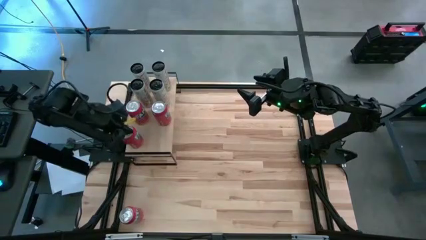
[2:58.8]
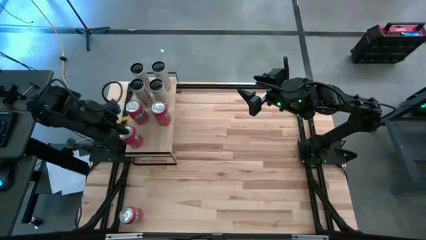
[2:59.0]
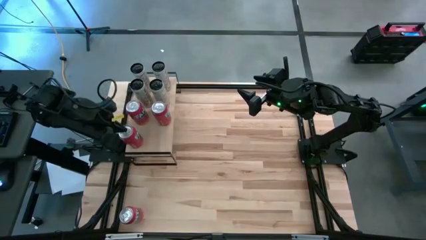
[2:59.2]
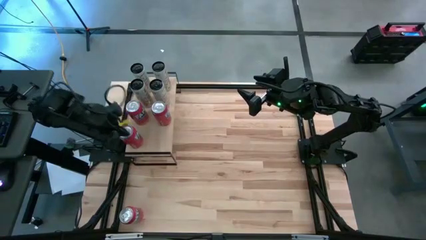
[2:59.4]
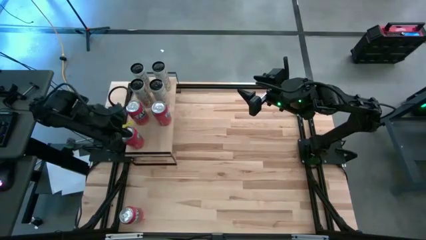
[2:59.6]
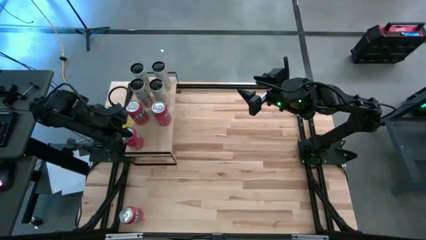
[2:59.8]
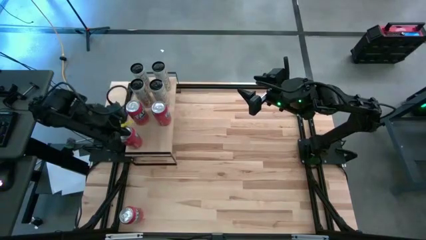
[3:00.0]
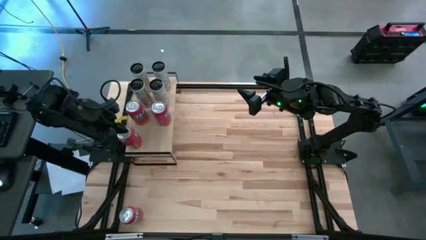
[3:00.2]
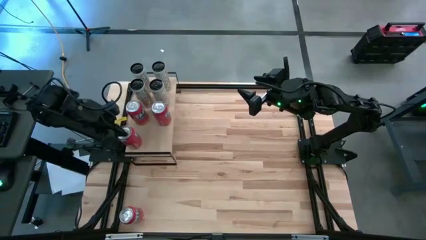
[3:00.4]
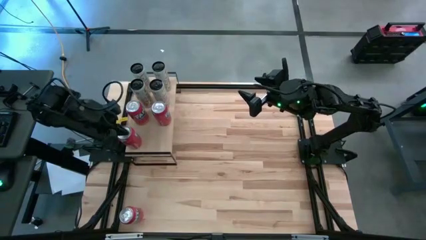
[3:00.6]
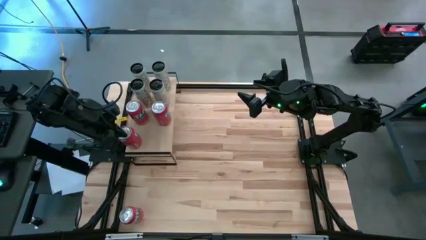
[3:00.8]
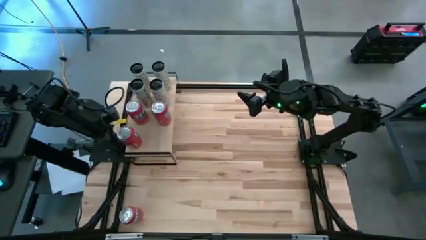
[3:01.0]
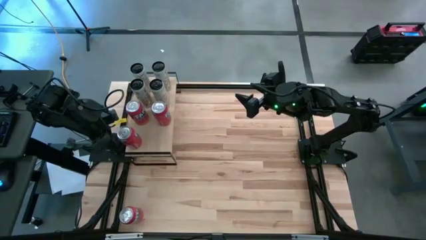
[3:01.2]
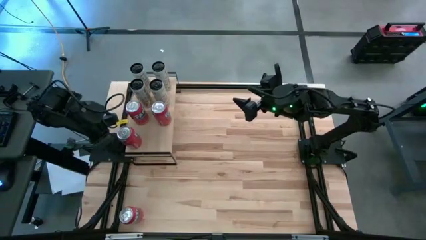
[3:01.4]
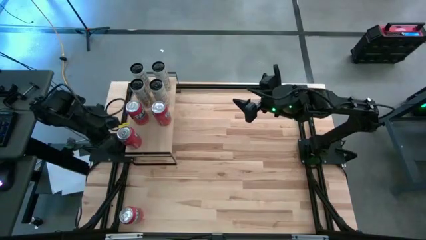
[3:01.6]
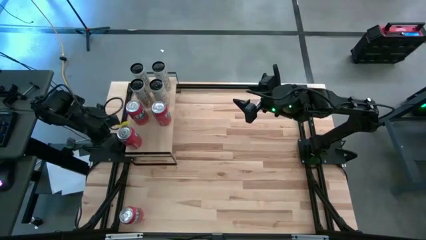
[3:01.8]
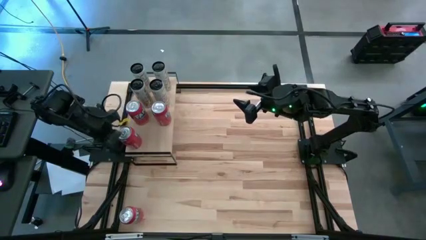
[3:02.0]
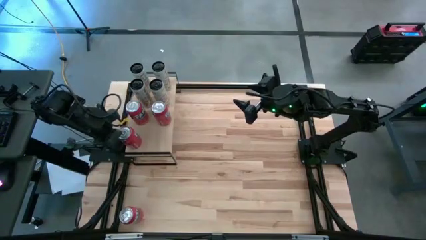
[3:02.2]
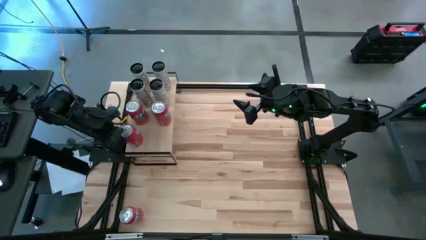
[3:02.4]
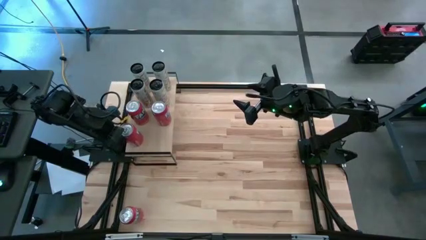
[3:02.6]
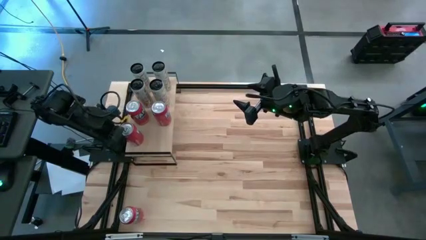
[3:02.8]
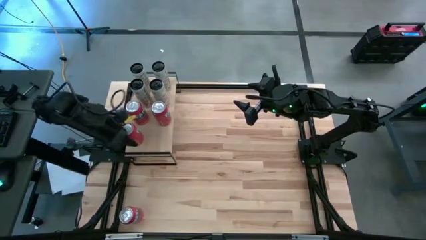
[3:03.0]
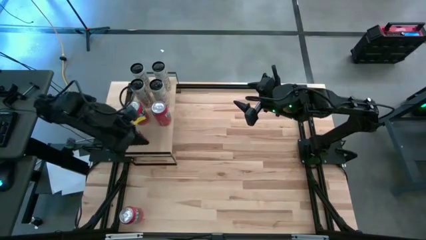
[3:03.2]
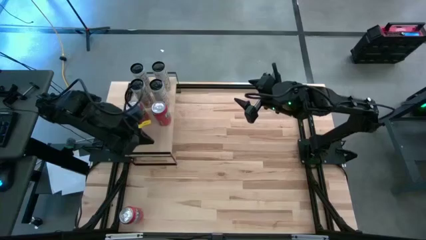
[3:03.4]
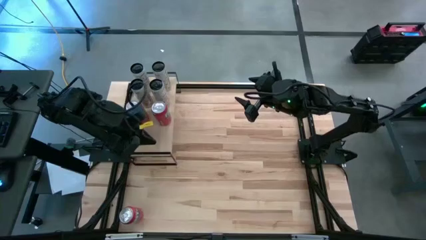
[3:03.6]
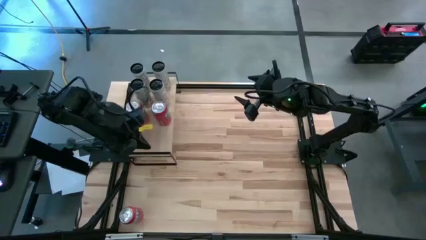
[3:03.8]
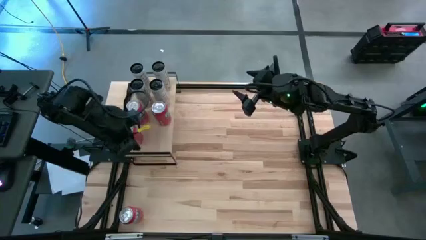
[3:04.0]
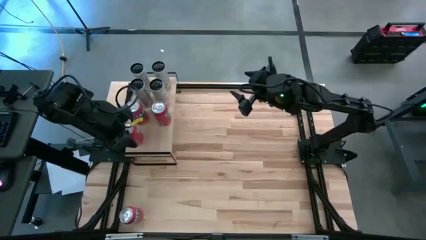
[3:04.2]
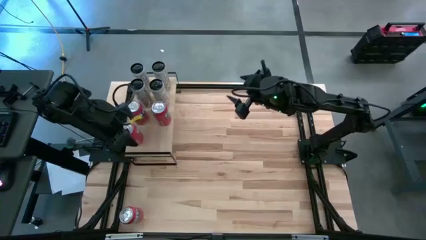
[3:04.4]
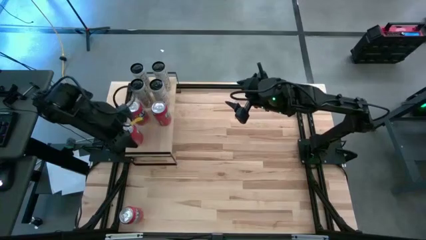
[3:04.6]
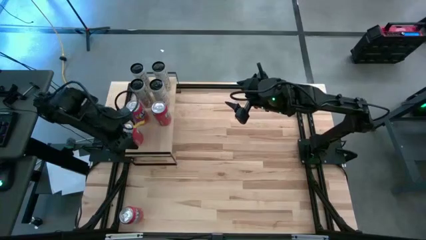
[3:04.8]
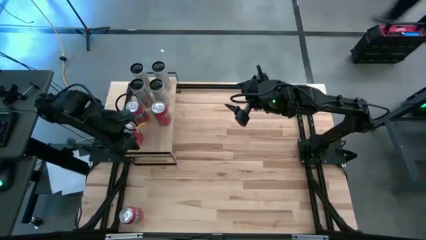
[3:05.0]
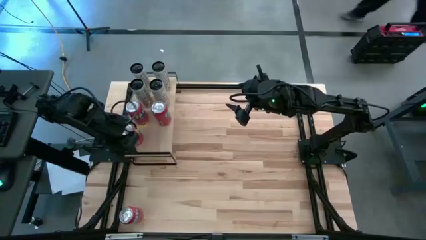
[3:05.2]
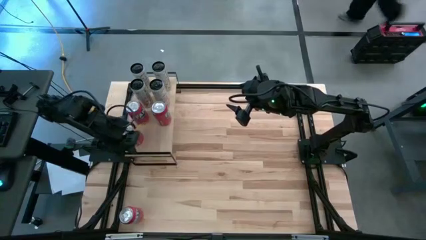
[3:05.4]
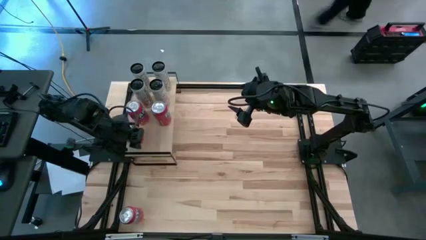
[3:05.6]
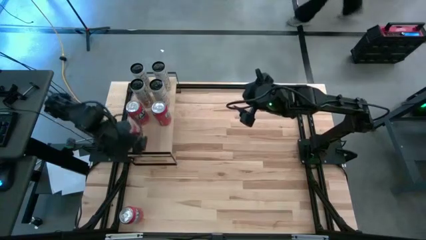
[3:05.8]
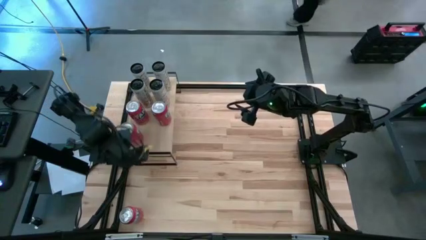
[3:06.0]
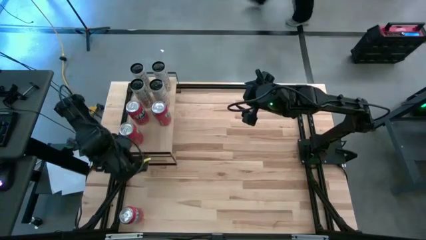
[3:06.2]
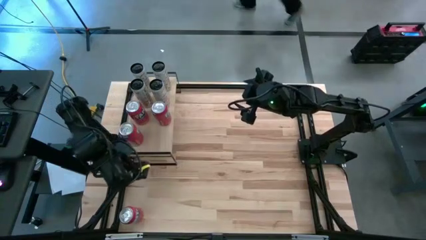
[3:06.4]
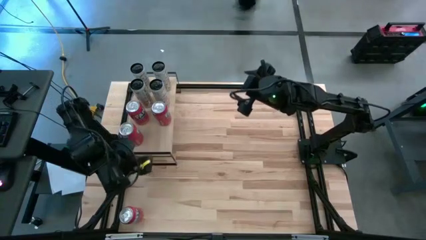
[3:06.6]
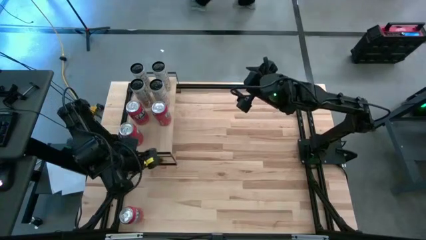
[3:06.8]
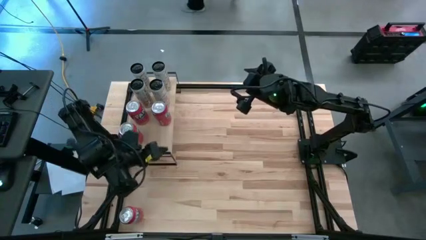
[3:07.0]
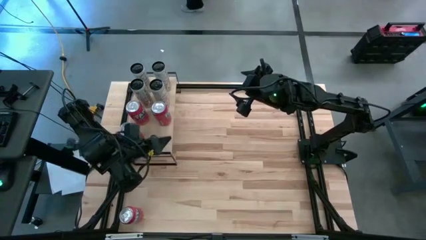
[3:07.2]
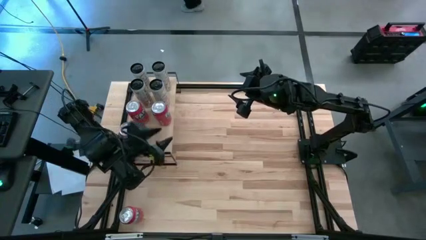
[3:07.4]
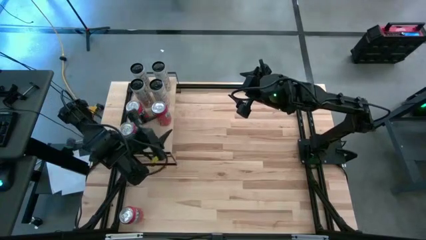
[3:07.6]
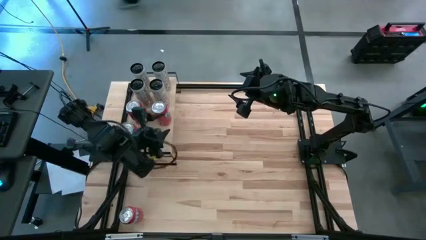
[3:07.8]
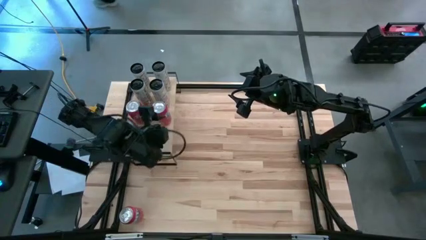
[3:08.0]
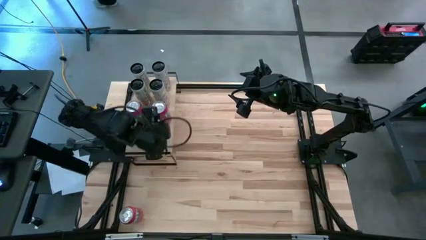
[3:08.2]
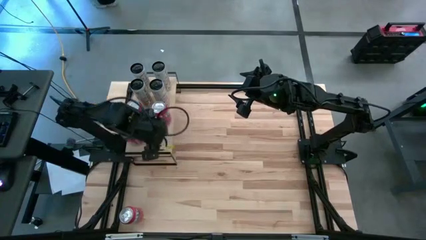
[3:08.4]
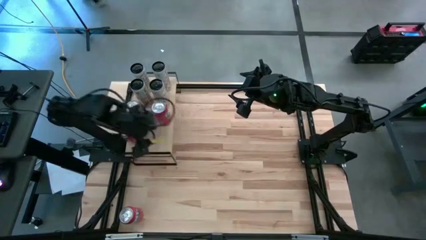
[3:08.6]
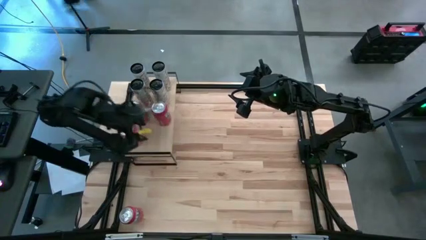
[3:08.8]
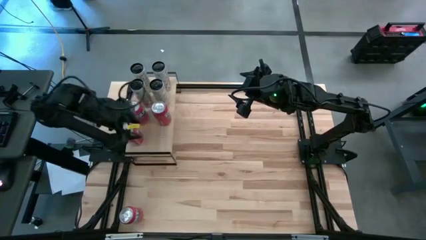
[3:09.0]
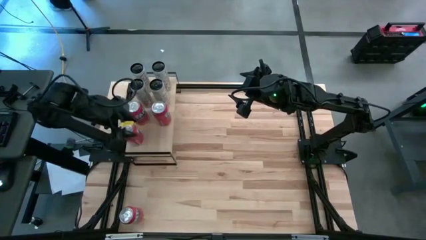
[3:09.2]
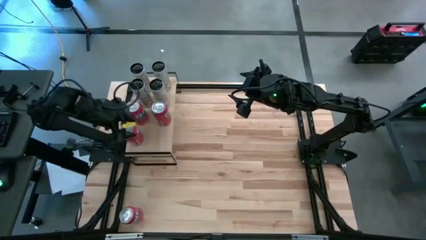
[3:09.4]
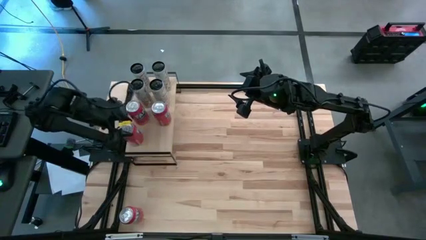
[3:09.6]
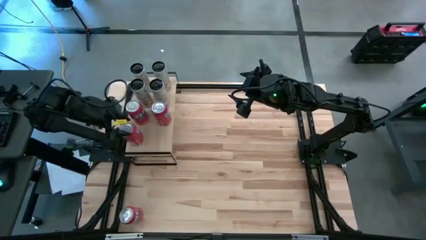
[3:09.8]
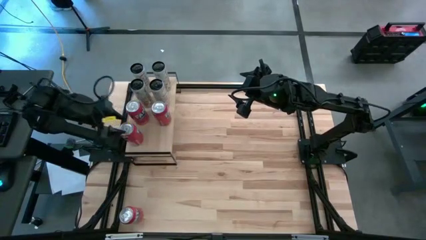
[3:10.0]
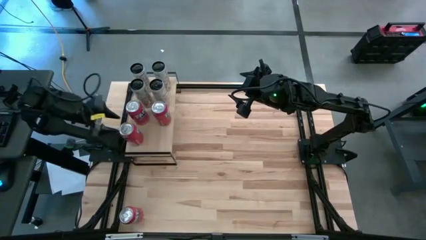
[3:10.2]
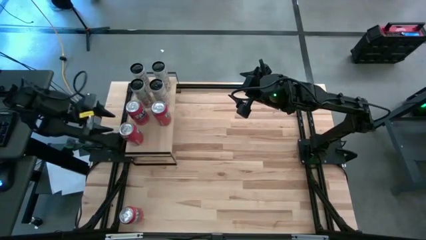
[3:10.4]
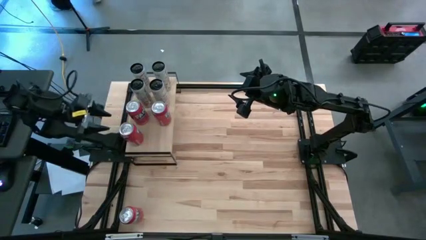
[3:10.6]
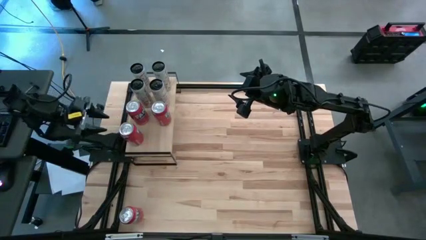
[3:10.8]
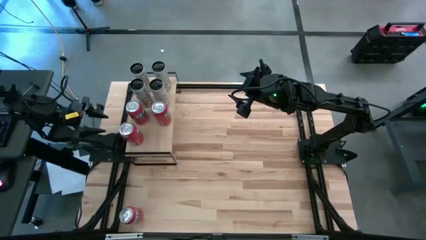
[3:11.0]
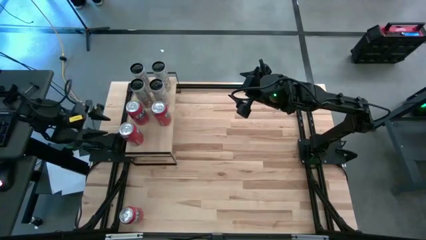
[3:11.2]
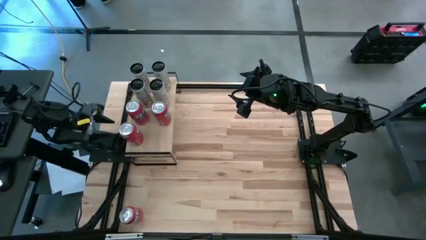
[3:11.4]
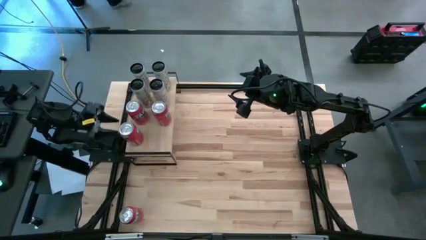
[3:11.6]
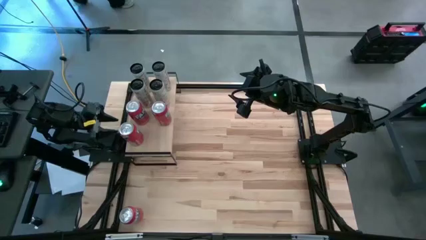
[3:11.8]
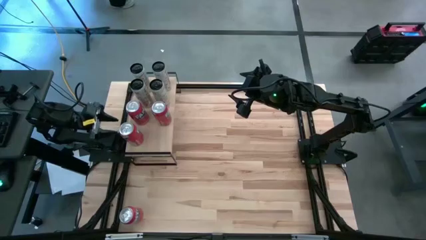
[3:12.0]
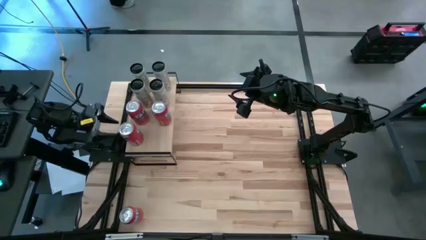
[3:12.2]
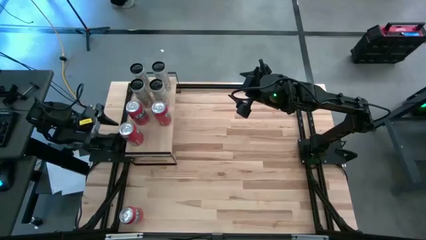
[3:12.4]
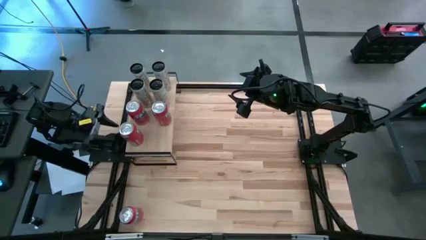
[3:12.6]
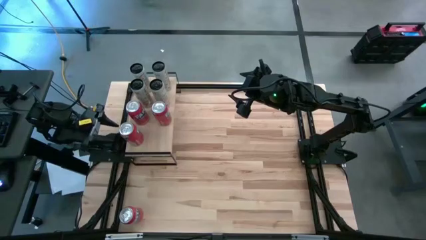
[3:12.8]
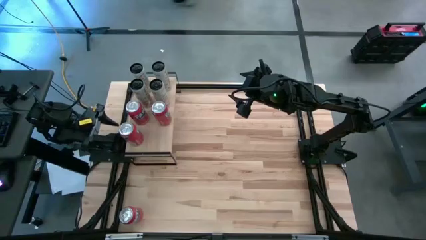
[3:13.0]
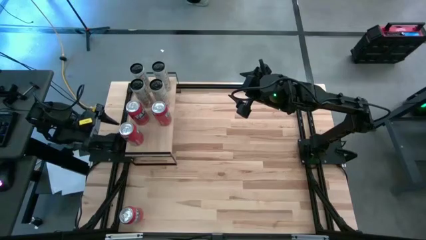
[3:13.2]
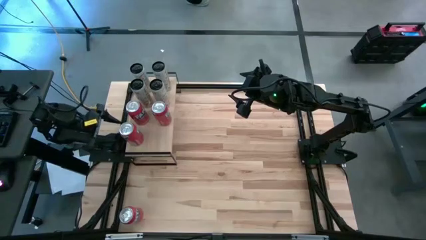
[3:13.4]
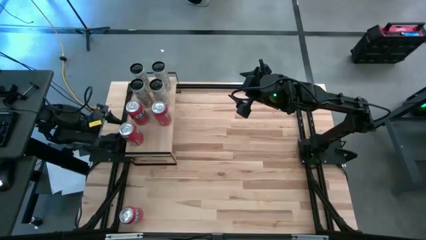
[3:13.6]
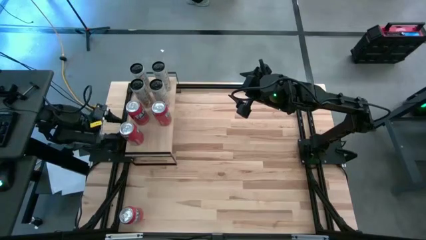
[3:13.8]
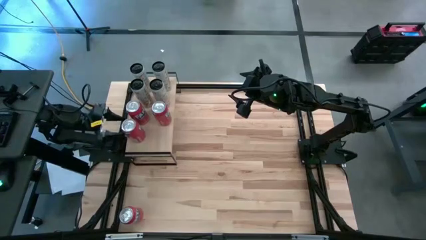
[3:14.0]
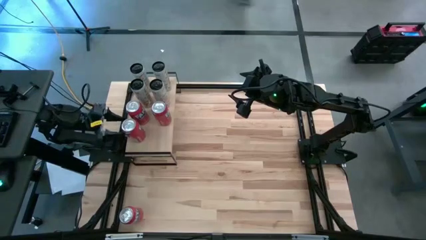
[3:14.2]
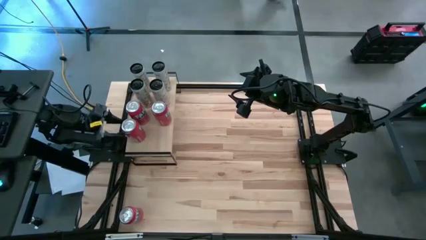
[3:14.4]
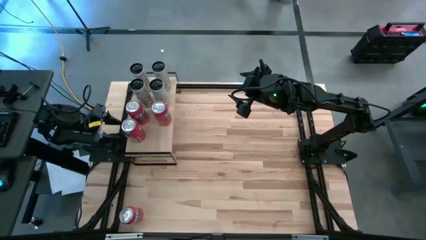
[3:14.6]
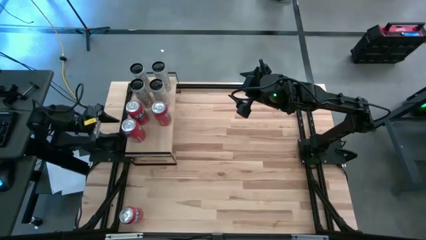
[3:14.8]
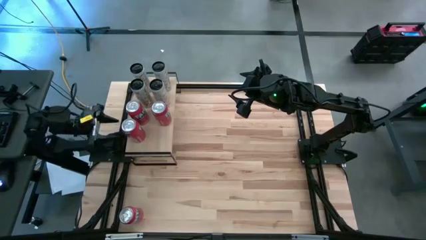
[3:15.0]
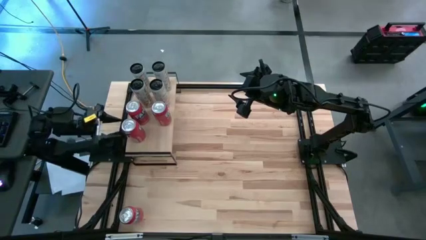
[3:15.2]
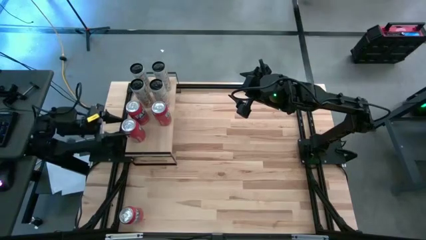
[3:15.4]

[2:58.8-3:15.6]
Task: Place canned beverage on shelf
Put the top red soda can on the shelf
